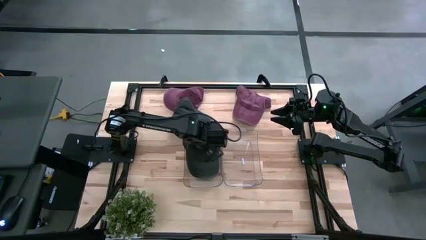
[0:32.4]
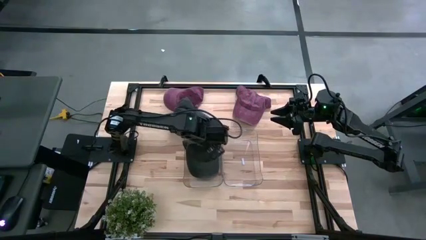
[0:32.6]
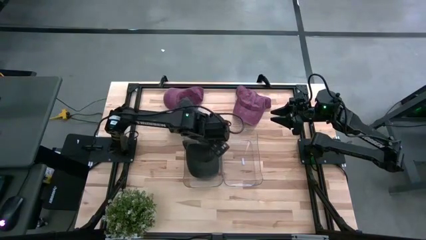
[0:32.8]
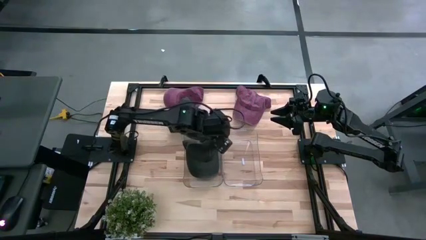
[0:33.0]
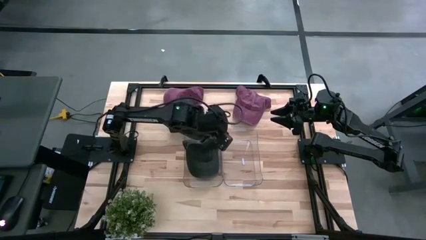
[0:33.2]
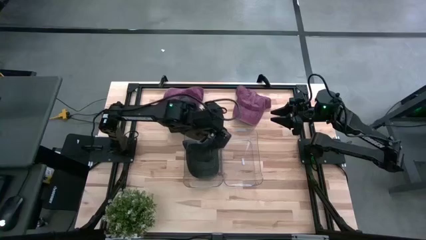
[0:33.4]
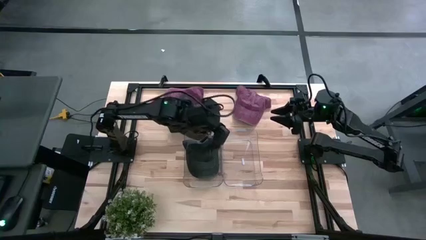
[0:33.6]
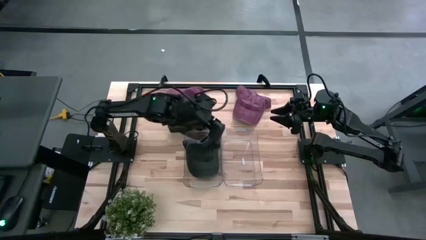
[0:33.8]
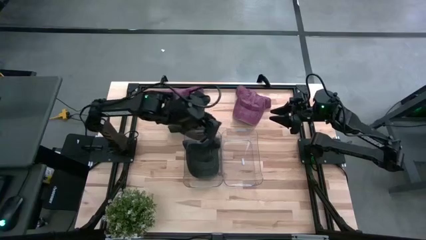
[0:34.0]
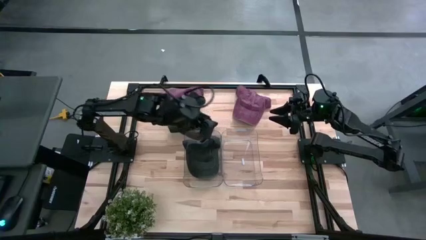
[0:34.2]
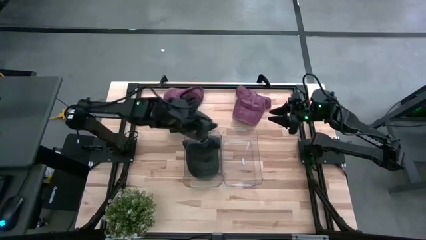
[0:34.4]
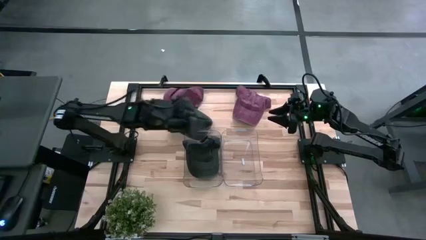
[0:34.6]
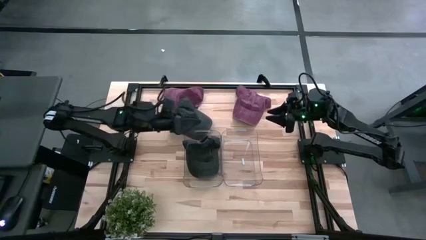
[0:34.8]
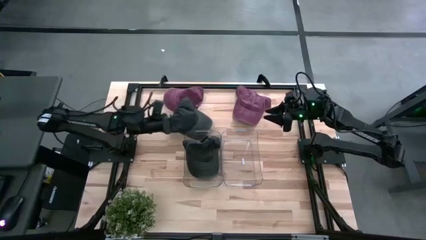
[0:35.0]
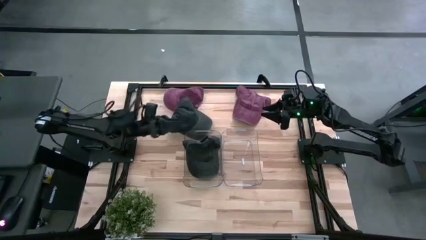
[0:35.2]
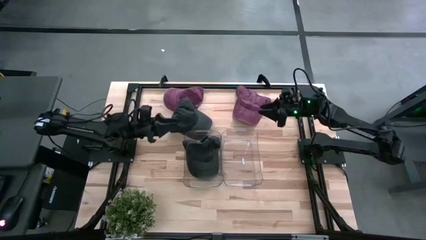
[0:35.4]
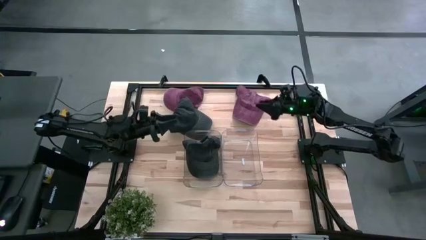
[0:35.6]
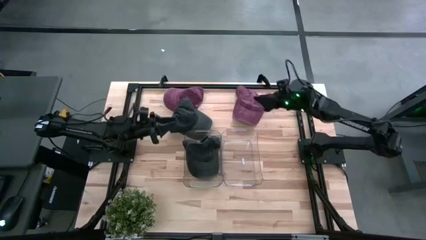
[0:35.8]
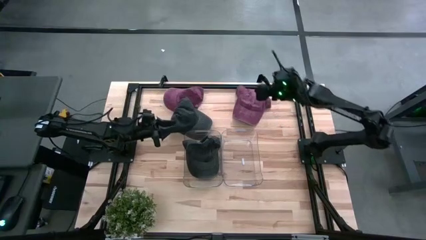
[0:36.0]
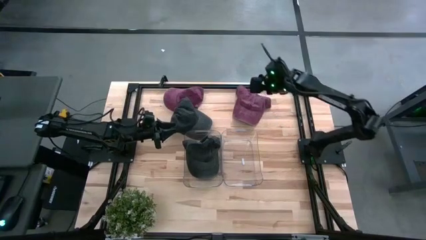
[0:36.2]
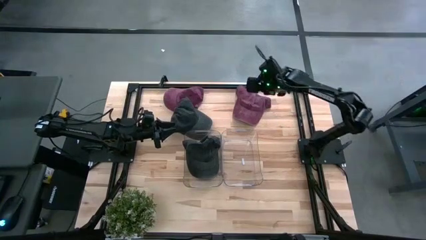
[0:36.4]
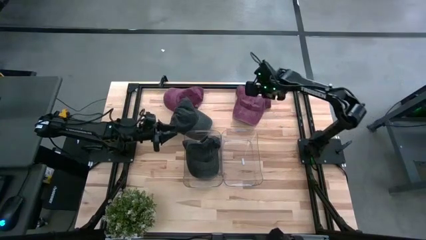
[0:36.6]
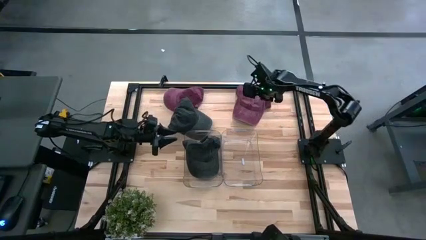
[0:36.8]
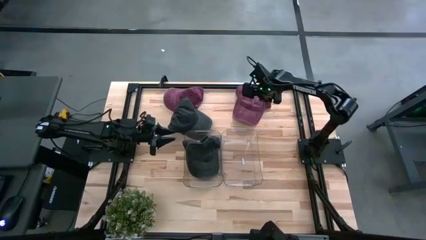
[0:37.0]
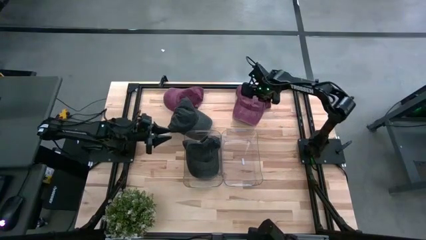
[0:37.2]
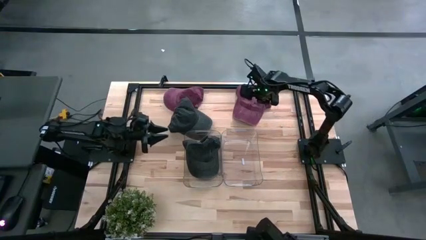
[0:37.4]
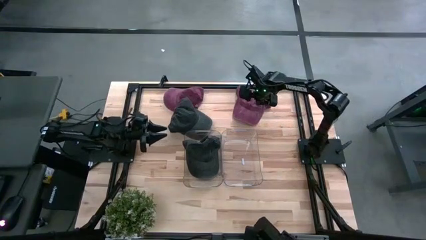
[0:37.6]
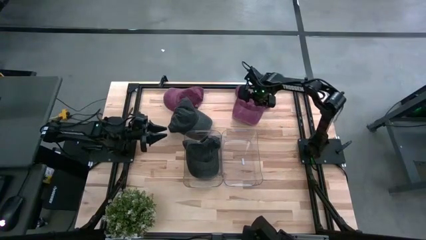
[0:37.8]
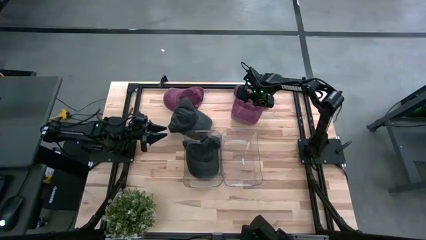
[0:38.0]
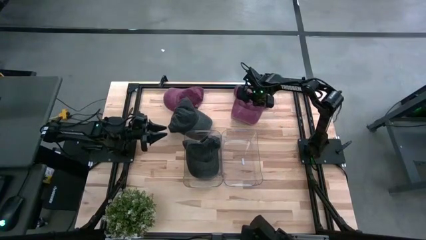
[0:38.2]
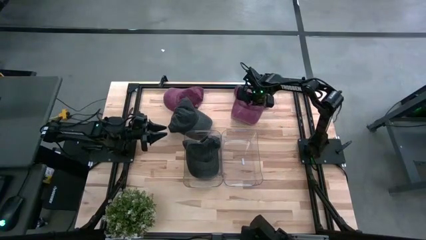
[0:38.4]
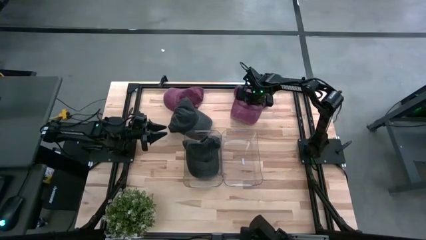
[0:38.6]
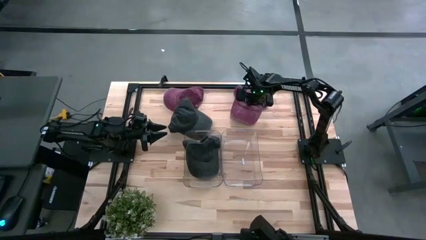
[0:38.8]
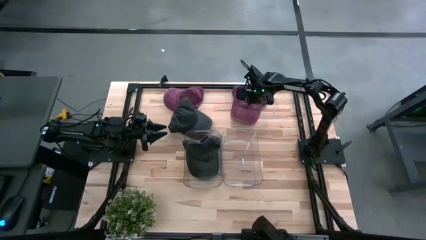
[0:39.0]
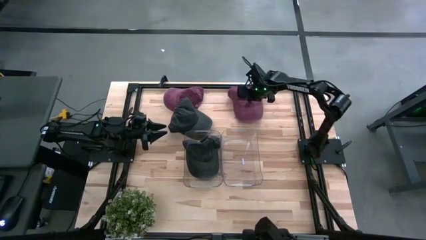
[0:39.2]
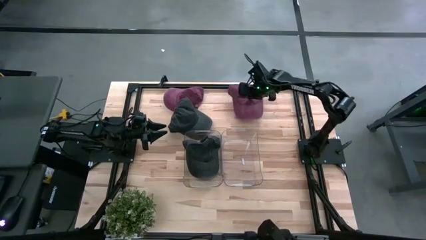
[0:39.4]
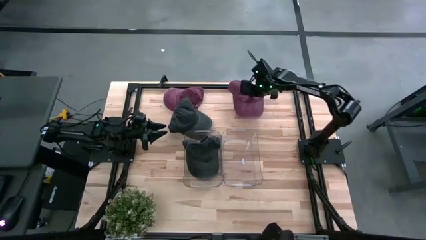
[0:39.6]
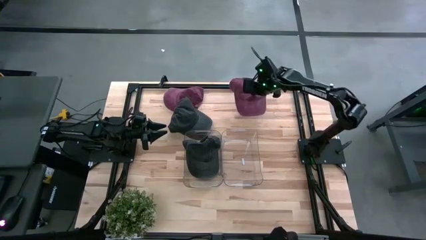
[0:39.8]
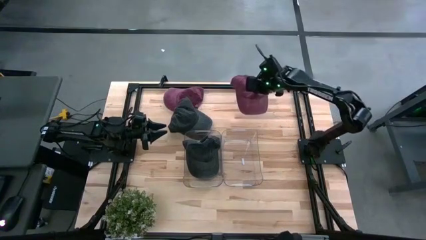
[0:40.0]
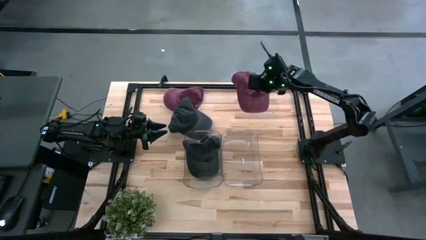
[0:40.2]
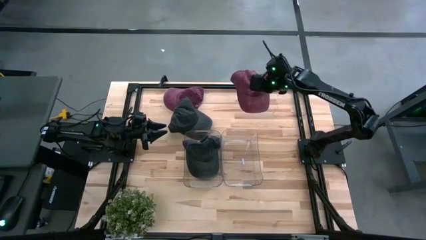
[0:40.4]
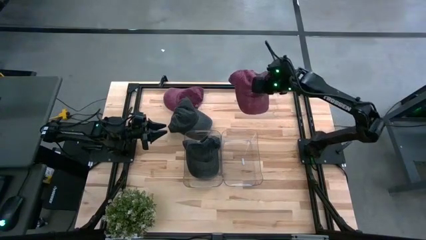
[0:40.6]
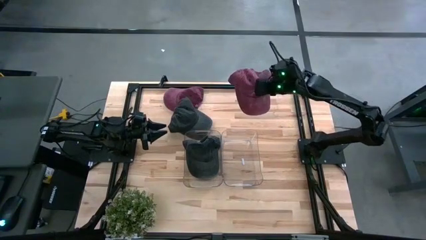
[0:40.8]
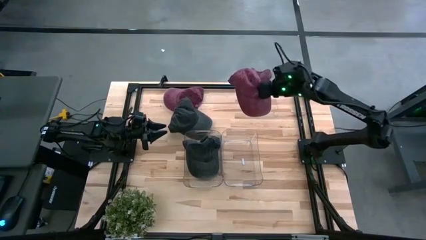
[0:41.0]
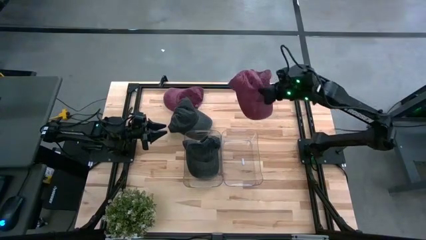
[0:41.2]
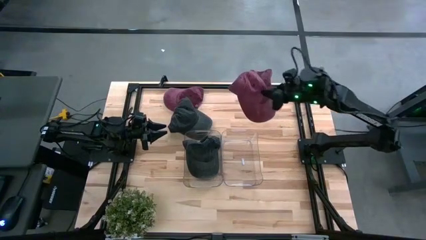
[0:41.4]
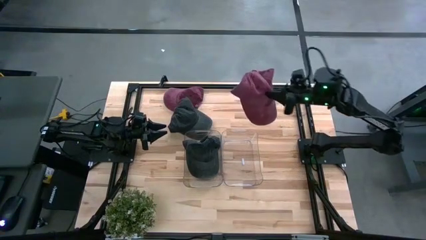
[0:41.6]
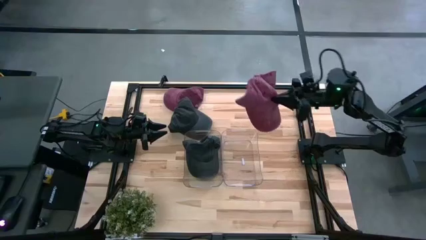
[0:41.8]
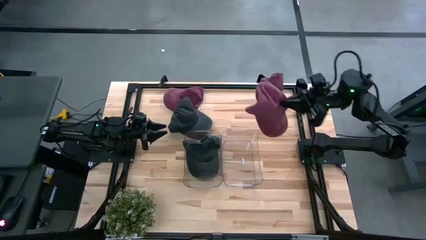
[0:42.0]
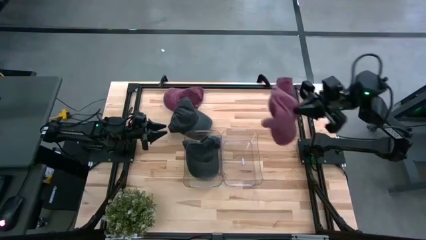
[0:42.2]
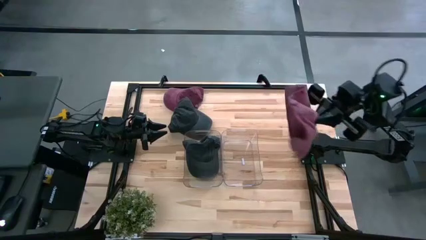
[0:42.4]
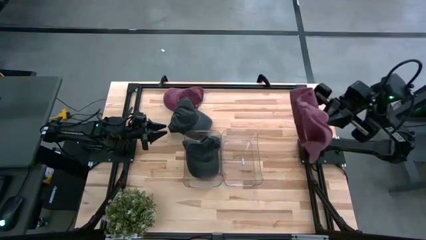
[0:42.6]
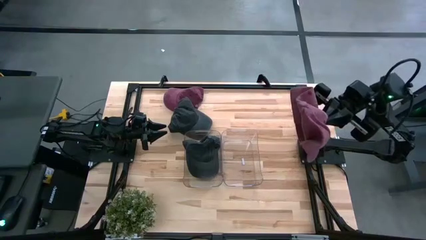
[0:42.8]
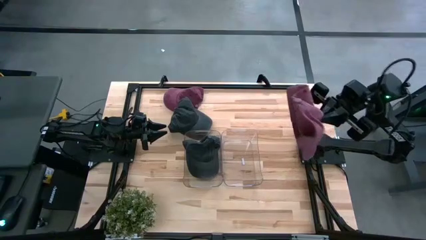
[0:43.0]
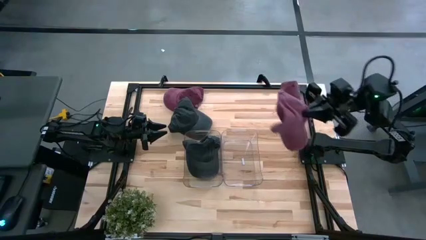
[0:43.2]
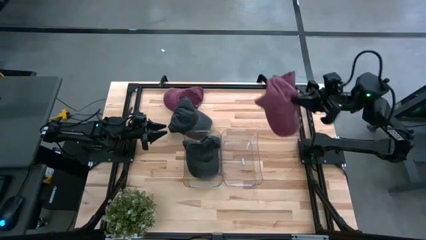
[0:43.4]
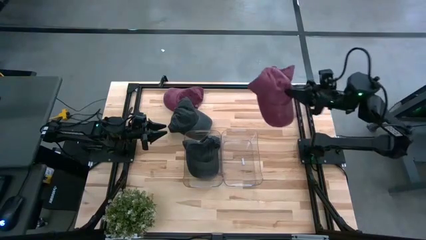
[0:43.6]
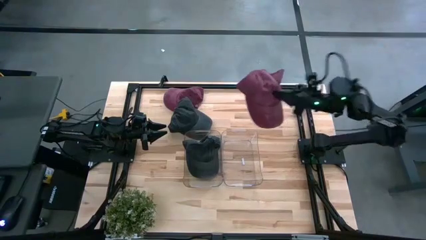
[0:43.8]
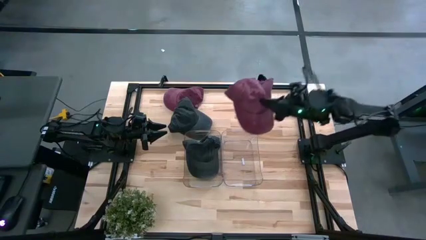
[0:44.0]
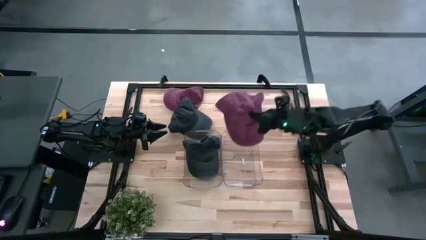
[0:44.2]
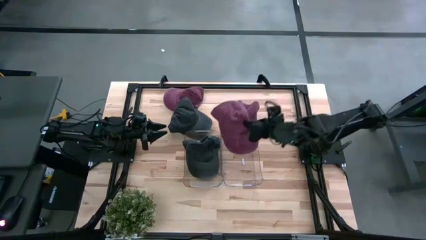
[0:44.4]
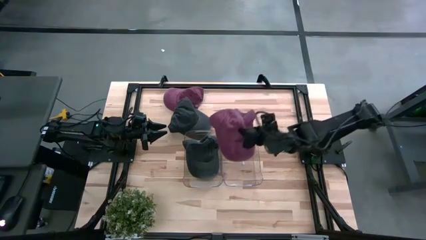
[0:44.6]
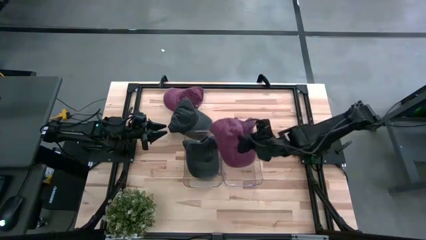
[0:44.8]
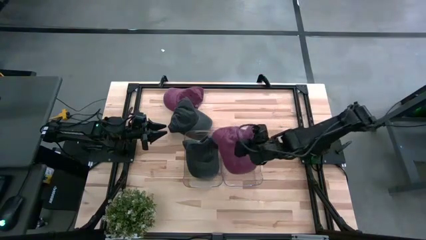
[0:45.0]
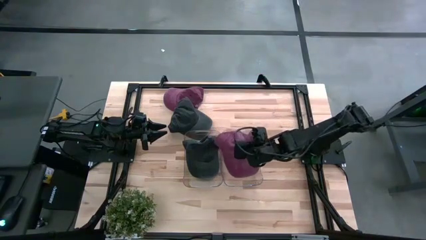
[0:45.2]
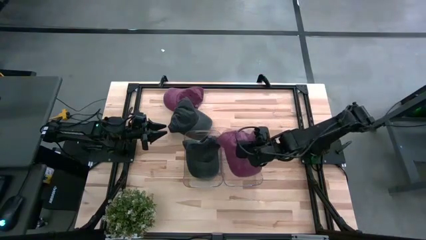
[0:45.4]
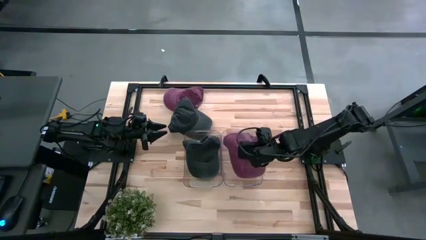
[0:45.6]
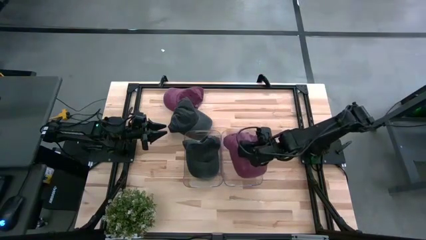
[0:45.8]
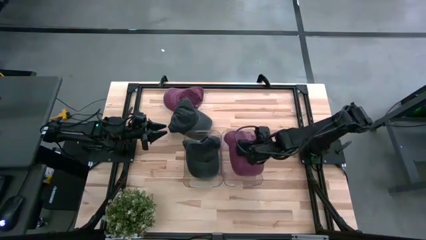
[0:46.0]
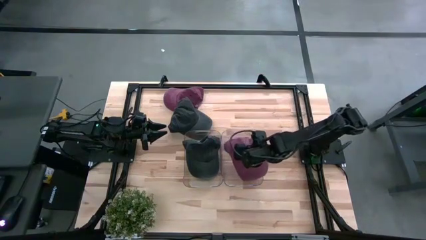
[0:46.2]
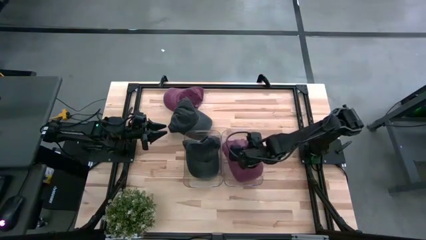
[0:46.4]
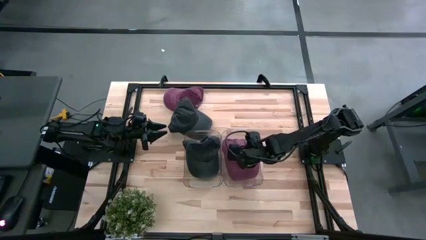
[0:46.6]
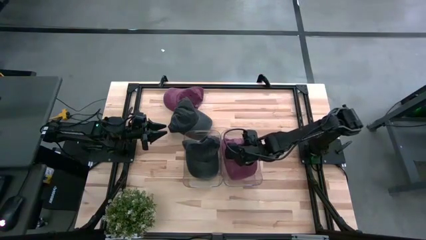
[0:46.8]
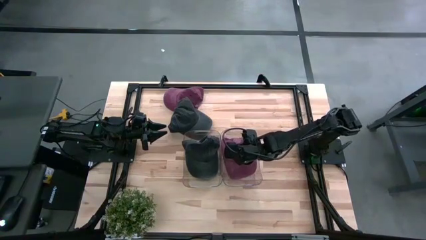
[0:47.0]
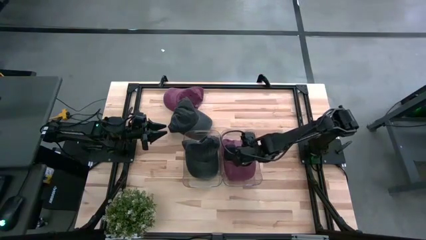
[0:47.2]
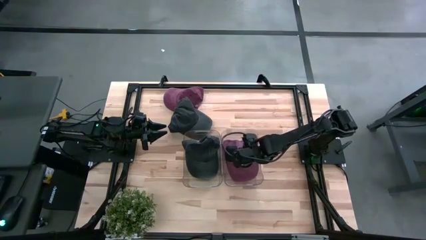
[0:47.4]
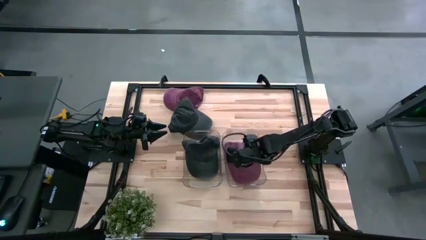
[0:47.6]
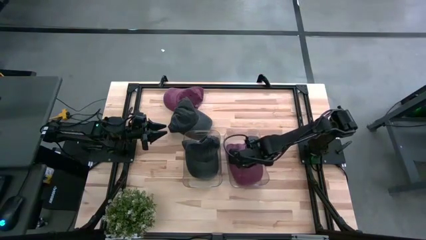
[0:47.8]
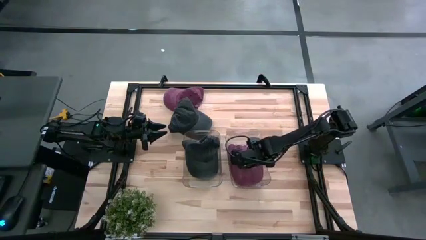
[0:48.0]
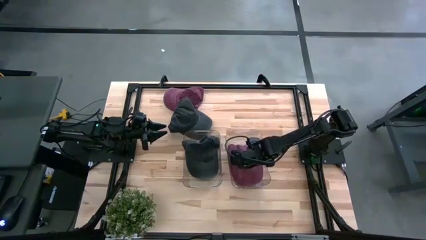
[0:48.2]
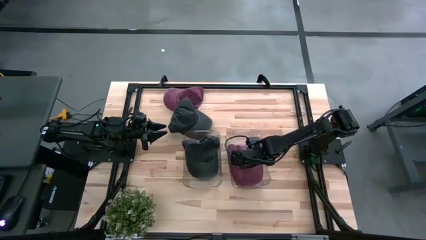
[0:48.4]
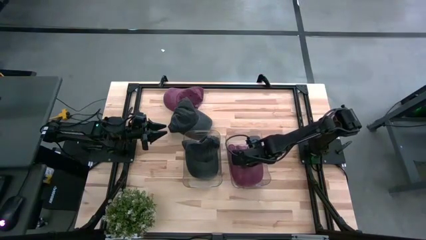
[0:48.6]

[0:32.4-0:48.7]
Task: Pick & Place hat
Put the right red cap into the right transparent bin
